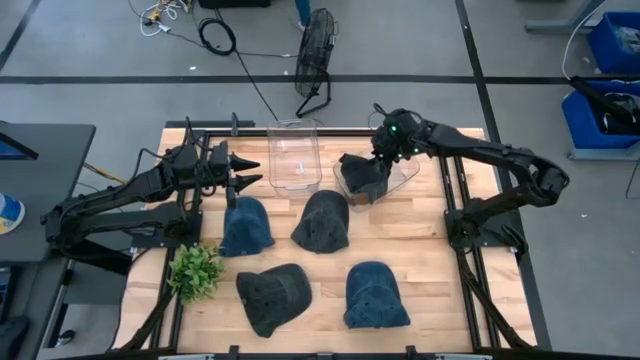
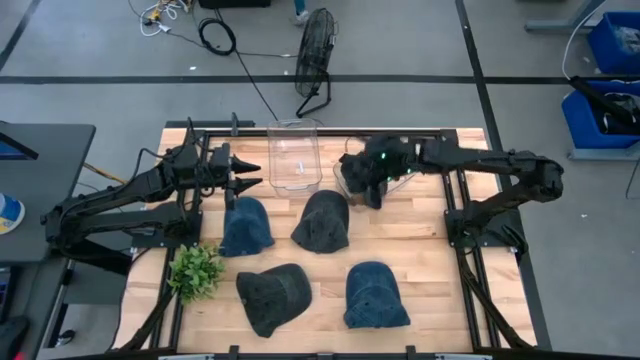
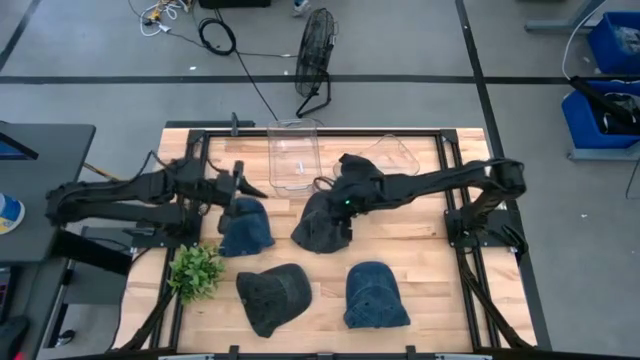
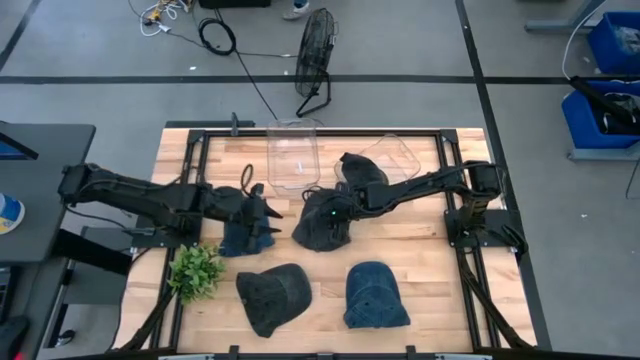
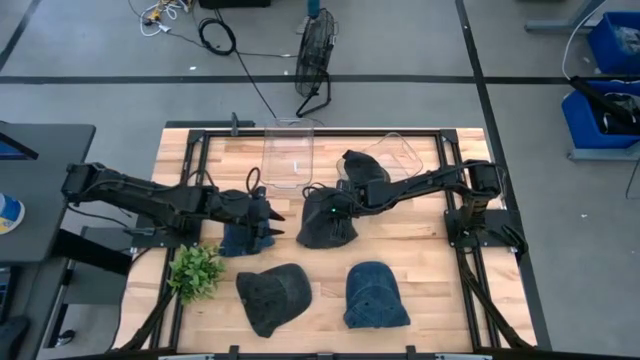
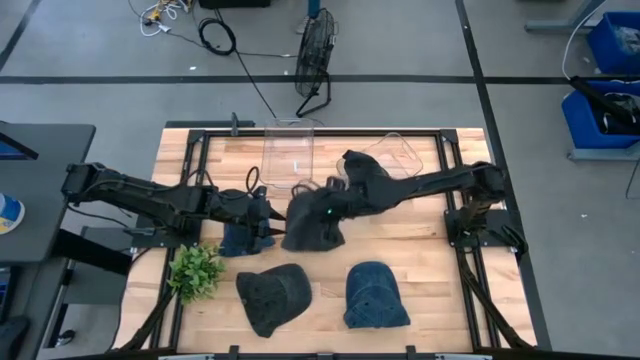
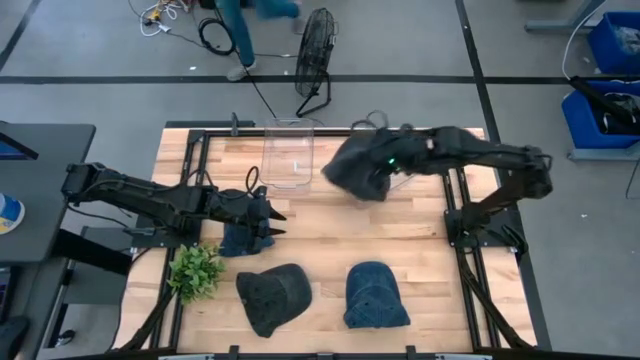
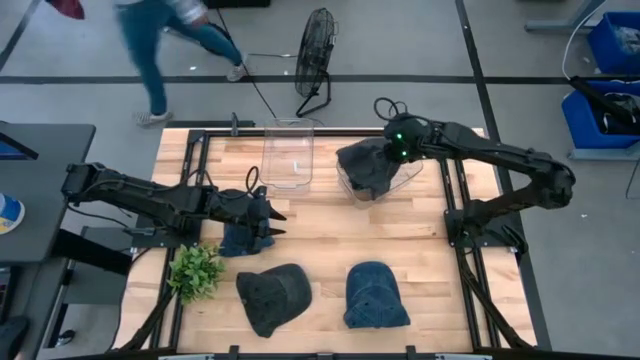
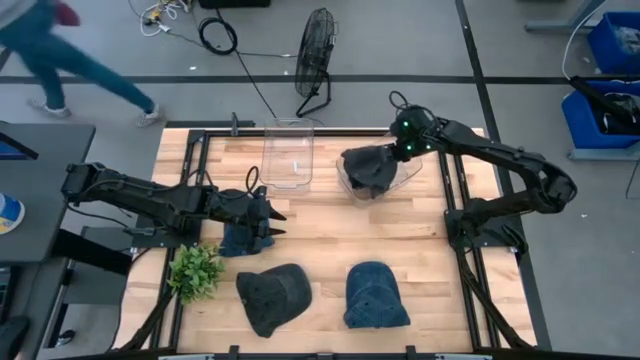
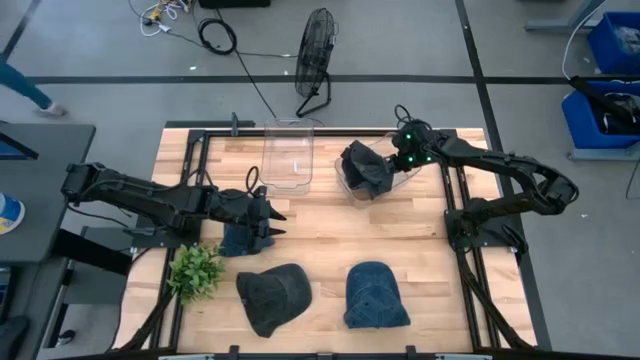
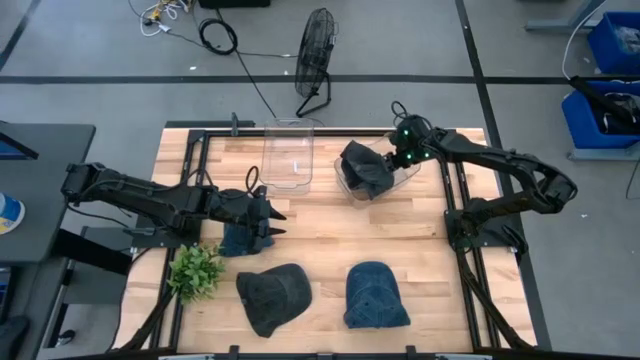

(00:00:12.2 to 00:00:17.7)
Task: Pick & Place hat
Put the top black cap into the right transparent bin

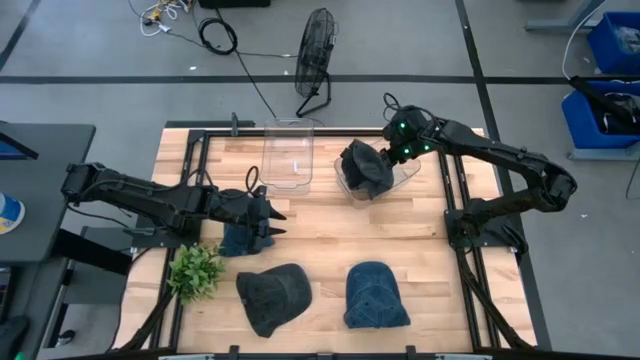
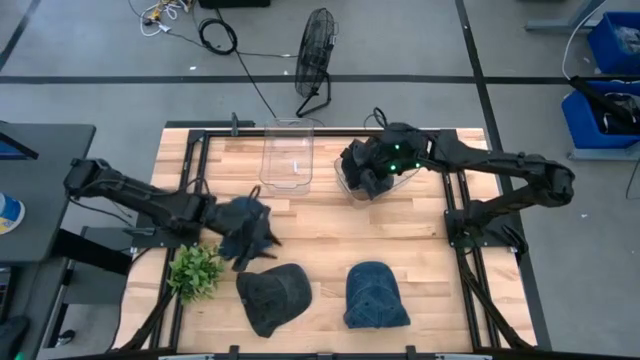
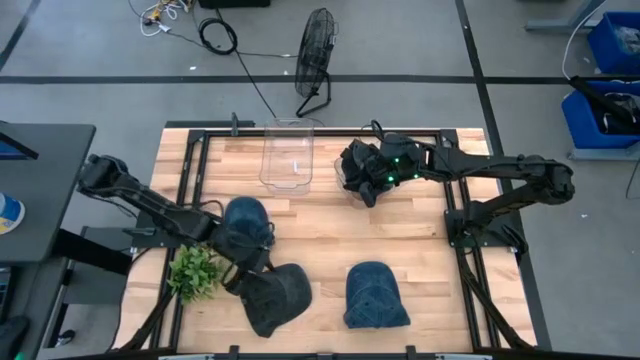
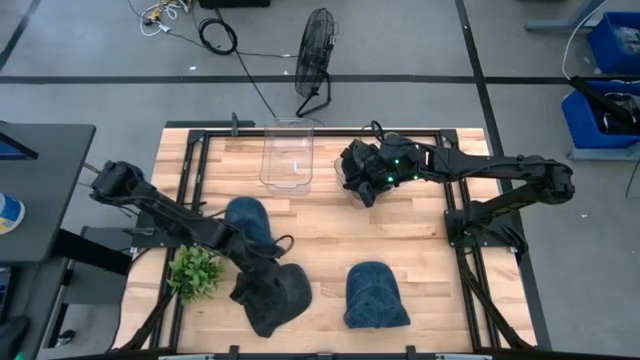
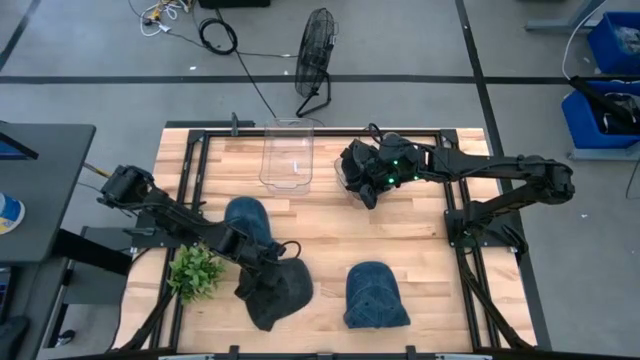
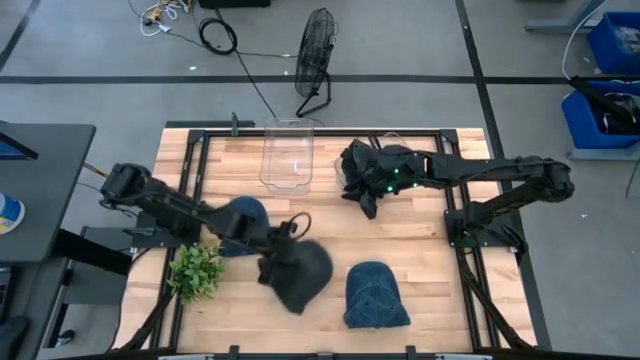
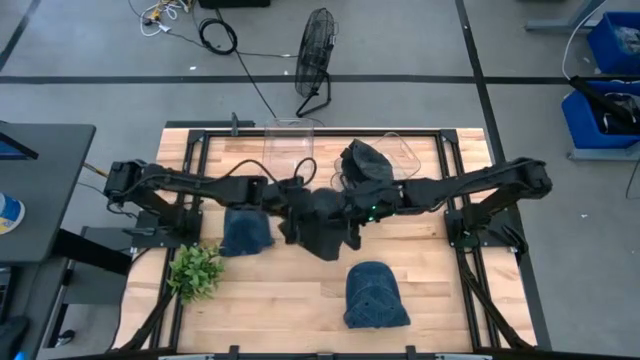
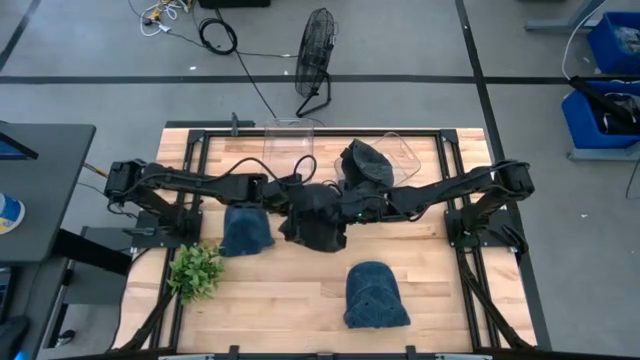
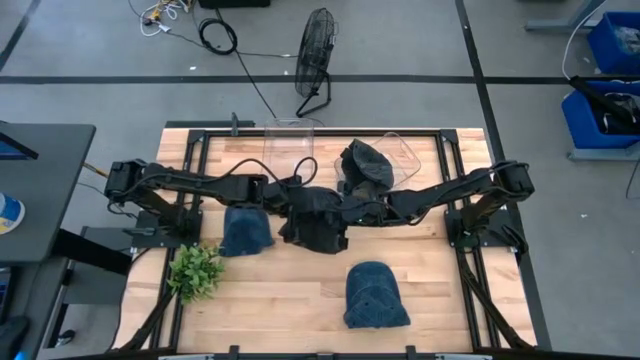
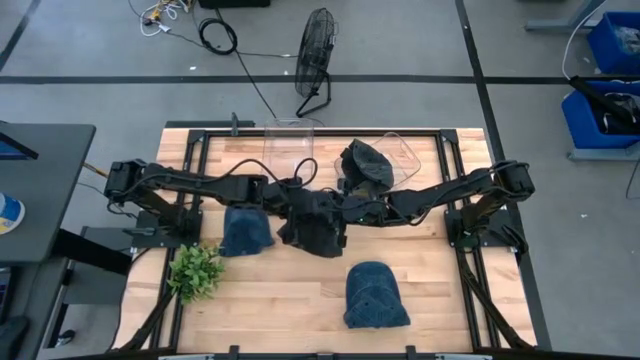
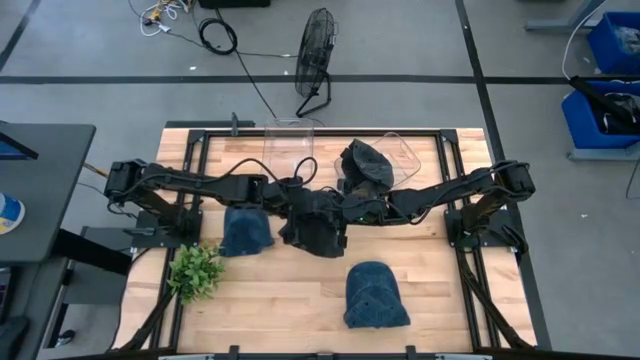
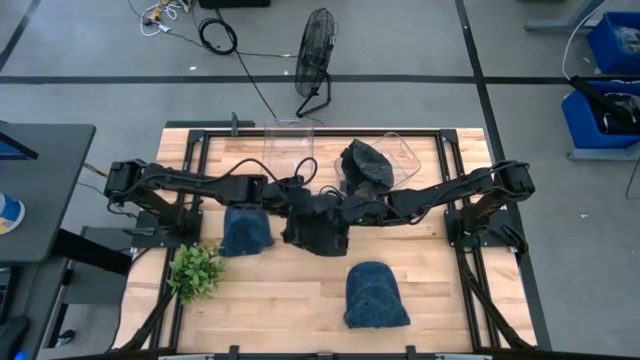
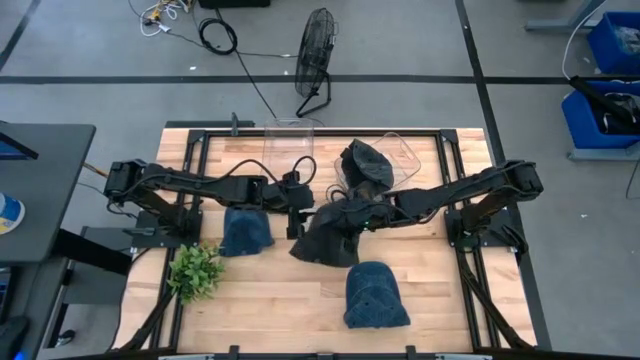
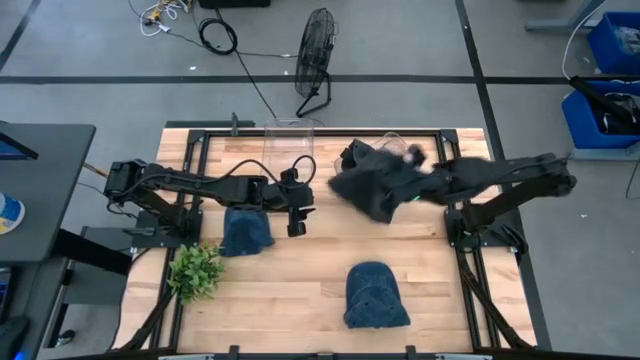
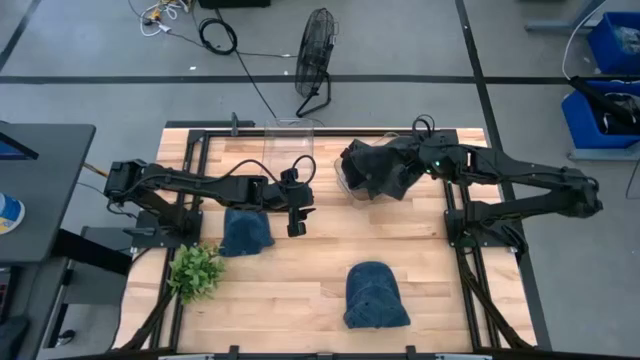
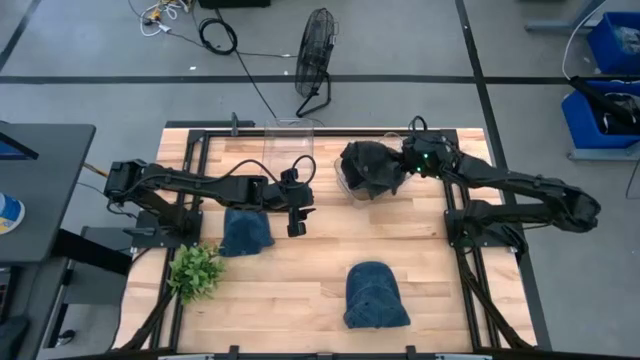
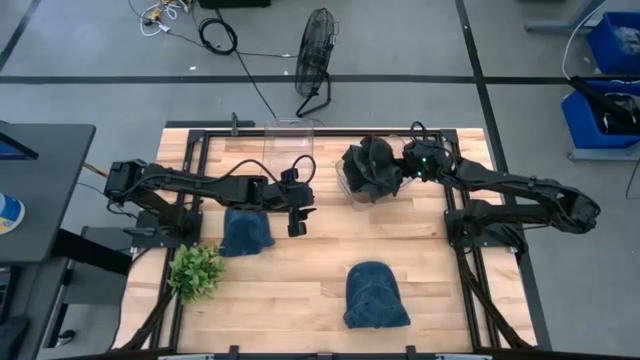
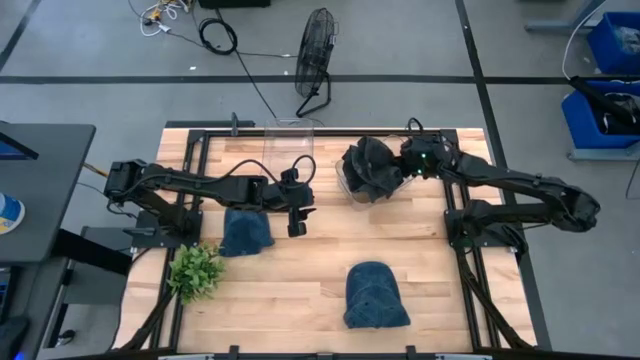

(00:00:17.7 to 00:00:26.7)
Put the black cap into the right transparent bin

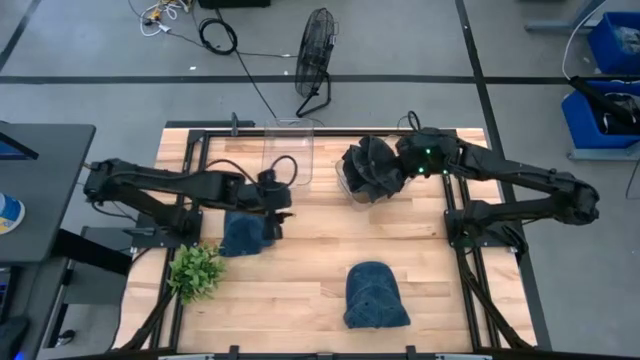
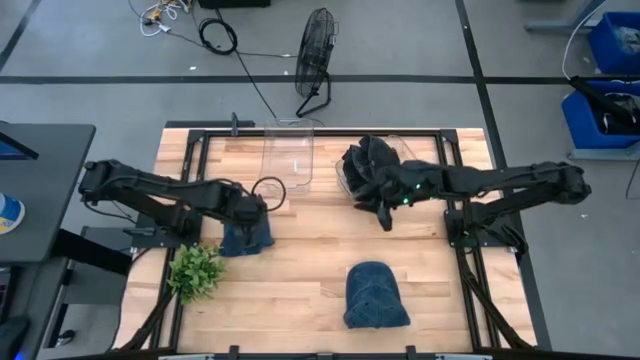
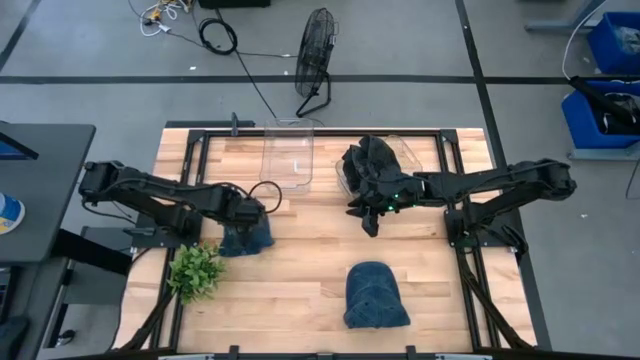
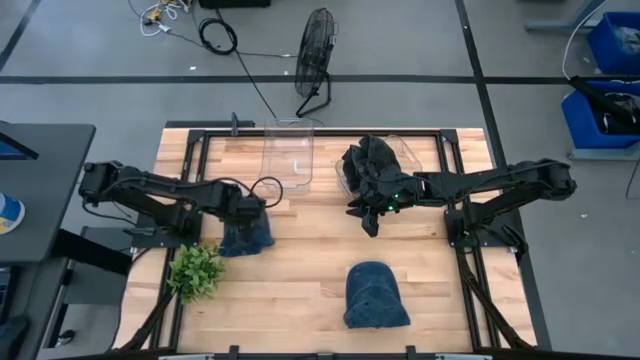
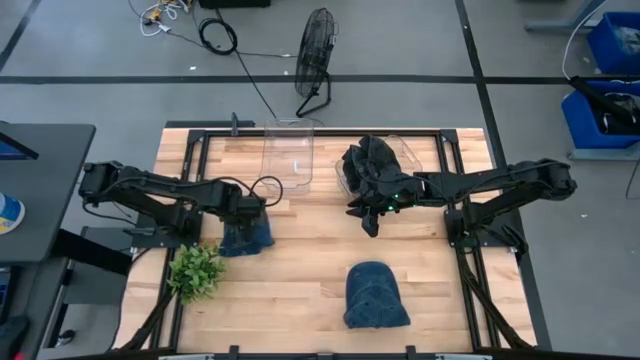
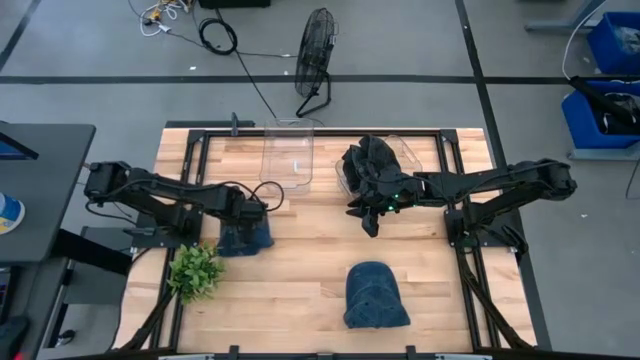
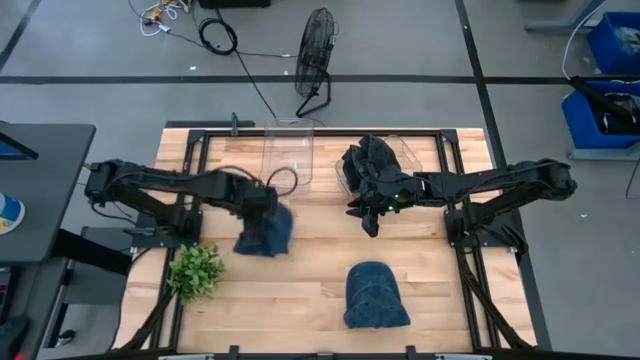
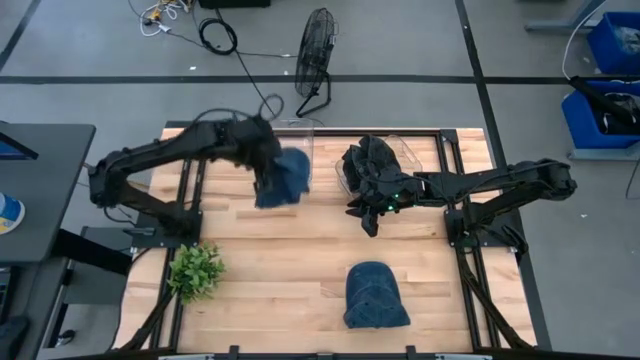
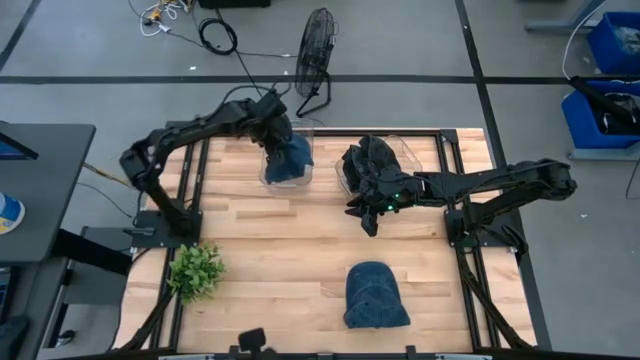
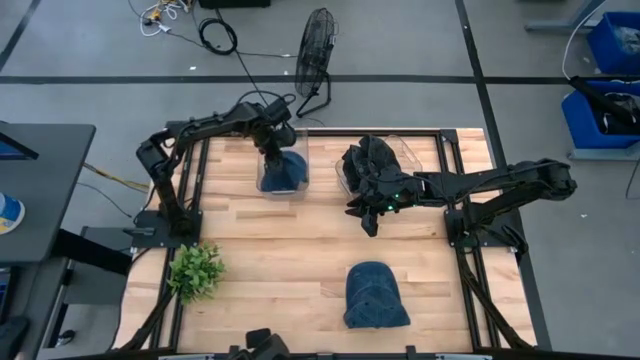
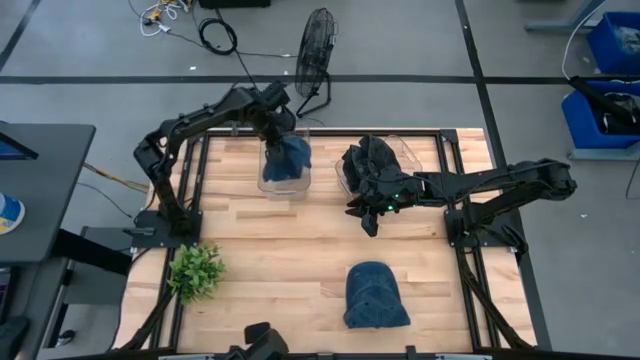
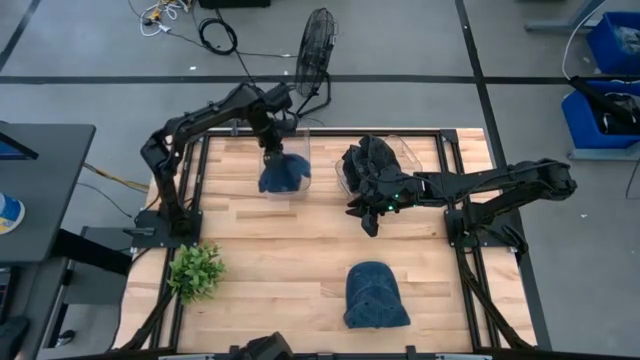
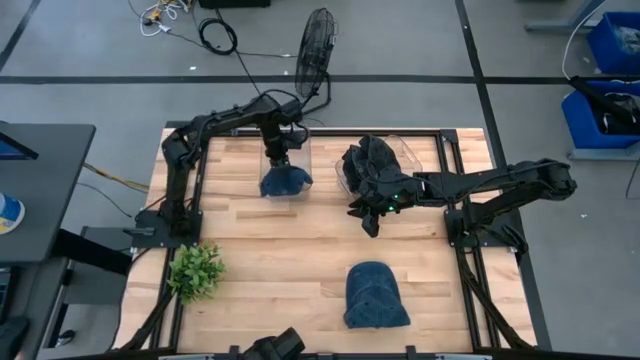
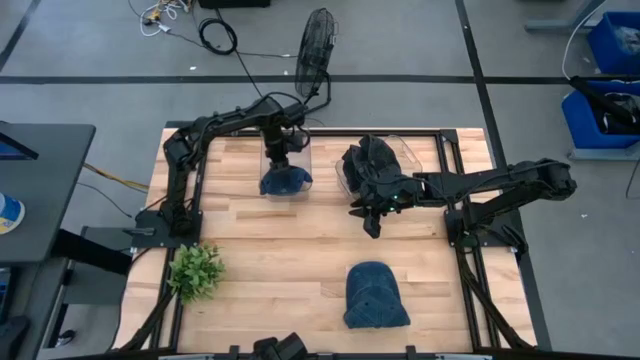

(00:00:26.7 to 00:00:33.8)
Put the top blue cap into the left transparent bin

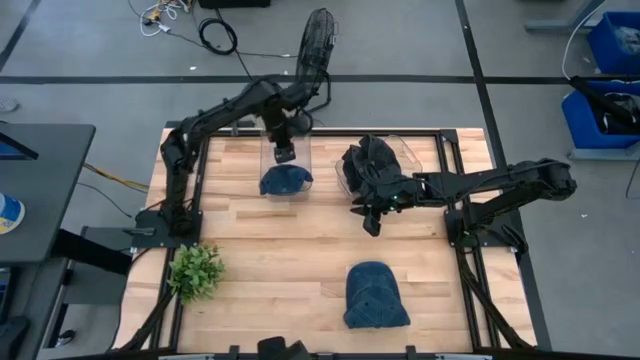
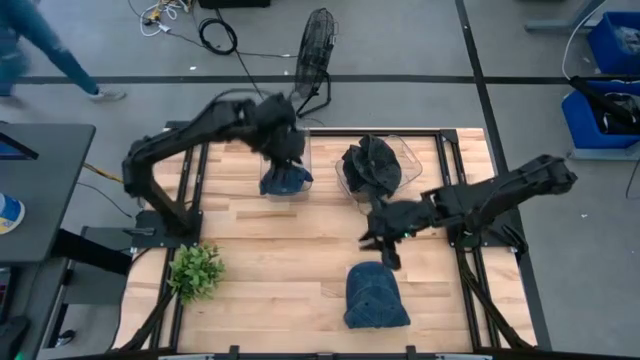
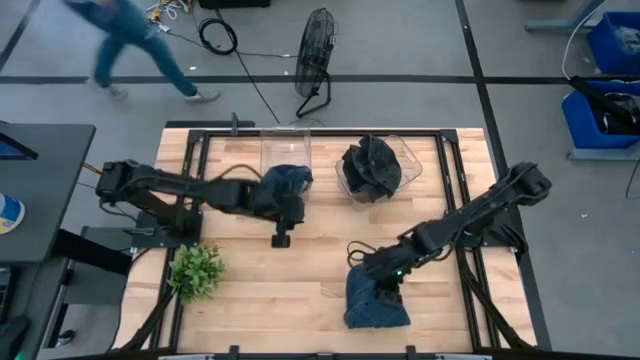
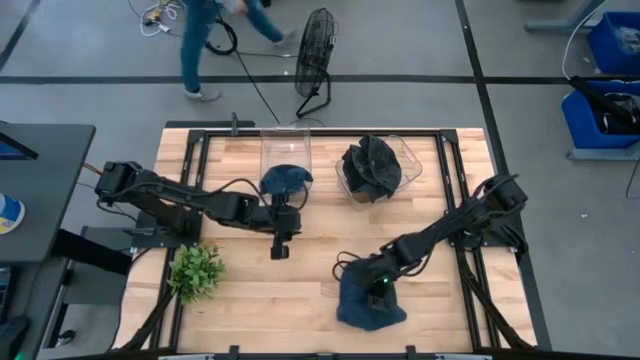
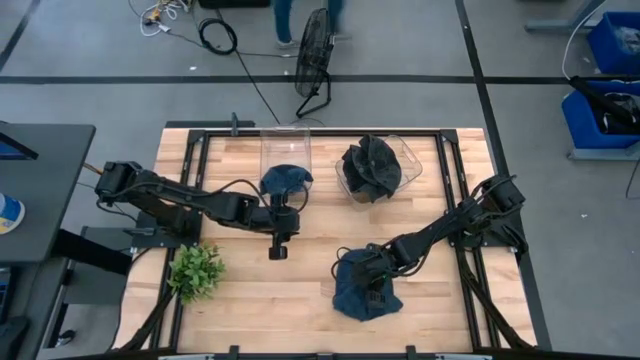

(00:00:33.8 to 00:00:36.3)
Put the blue cap into the left transparent bin
